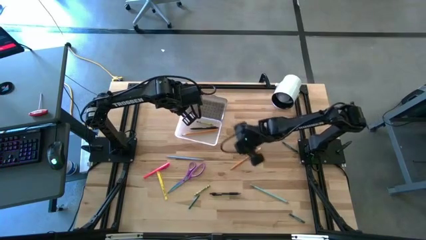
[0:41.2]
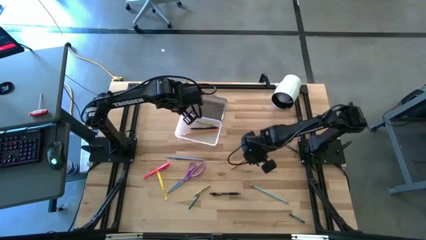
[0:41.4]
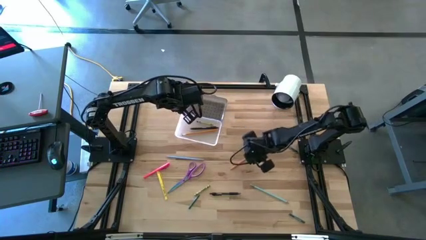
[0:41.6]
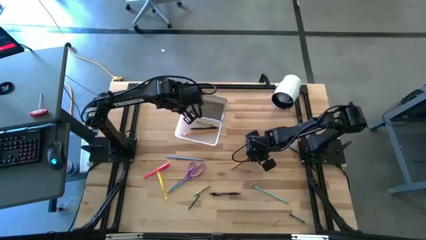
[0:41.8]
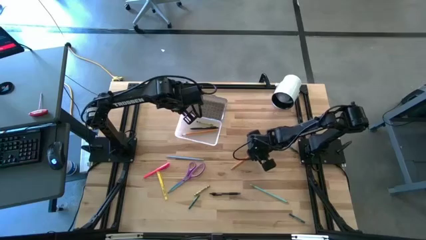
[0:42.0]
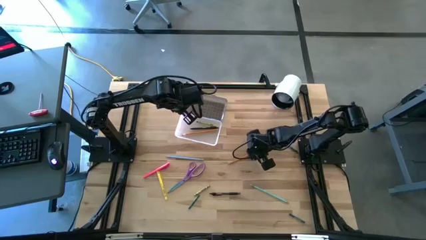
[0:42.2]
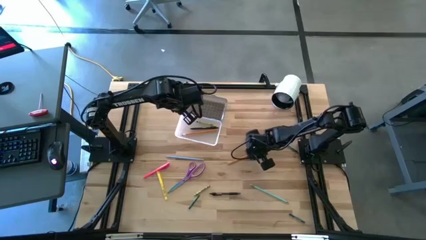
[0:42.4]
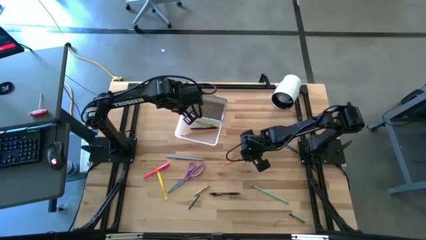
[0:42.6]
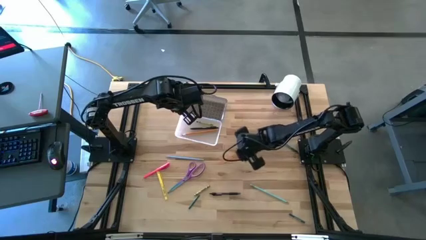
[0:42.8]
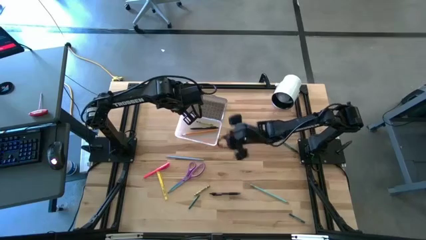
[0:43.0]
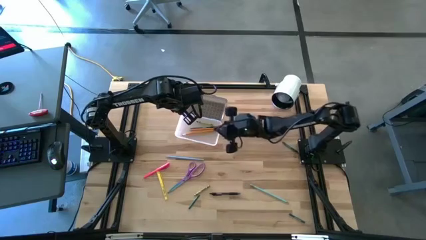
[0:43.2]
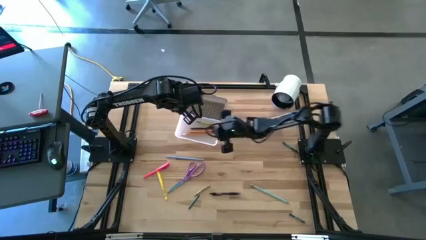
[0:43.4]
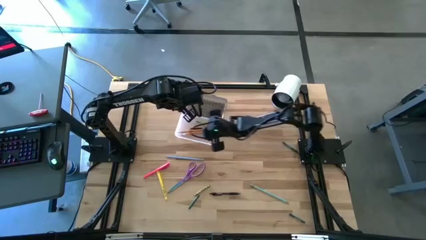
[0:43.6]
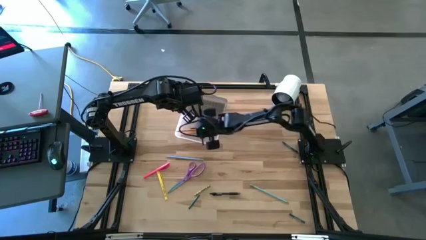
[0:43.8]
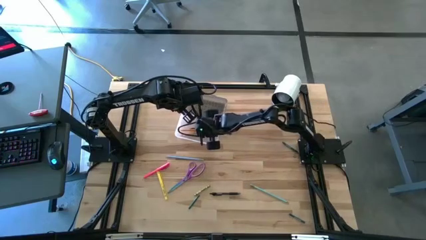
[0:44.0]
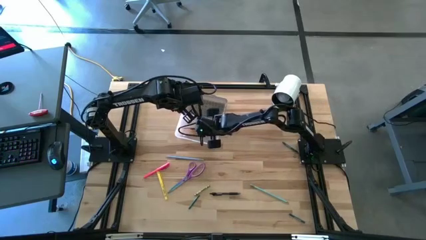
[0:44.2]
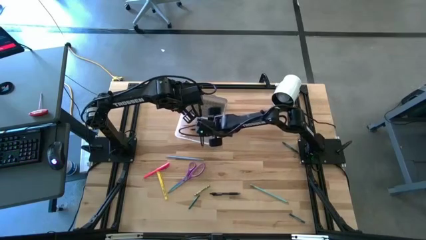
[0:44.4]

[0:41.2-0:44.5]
Task: Pick & place school supplies into a supply box
Put the orange pencil into the black supply box

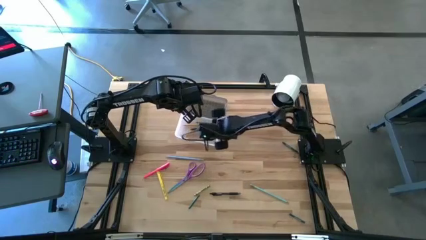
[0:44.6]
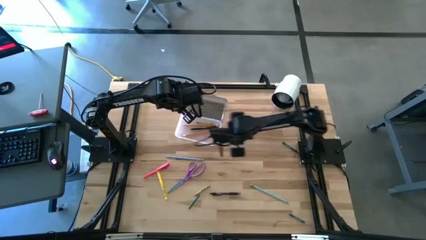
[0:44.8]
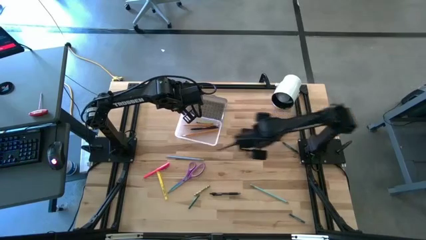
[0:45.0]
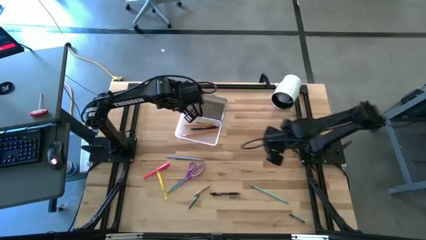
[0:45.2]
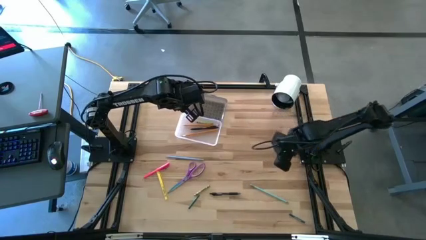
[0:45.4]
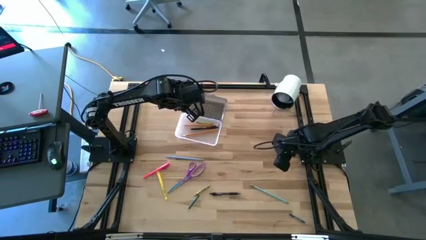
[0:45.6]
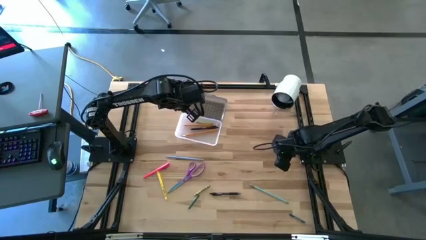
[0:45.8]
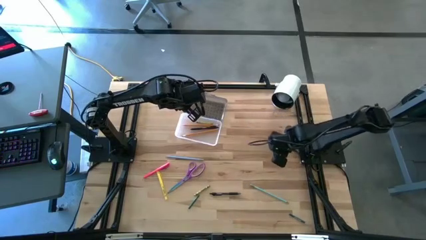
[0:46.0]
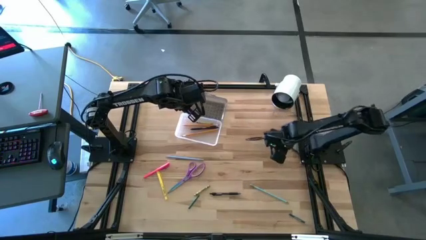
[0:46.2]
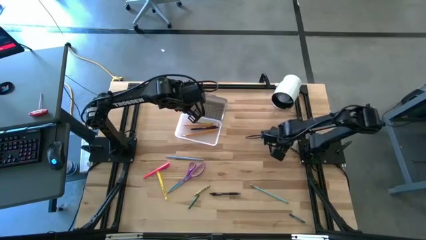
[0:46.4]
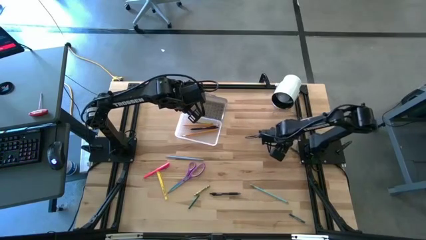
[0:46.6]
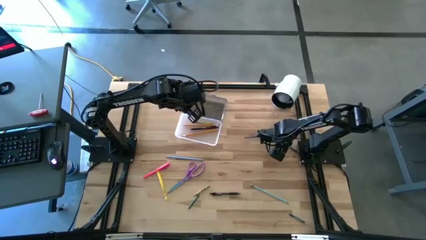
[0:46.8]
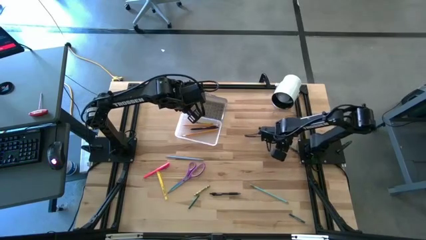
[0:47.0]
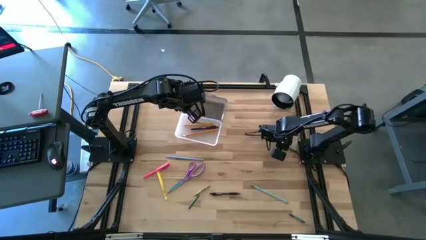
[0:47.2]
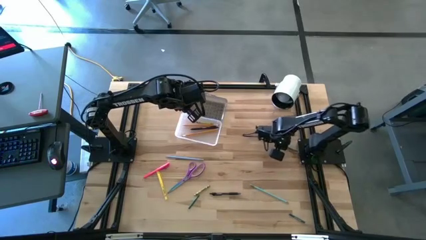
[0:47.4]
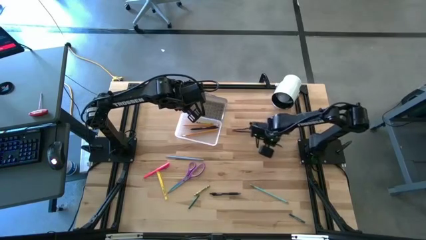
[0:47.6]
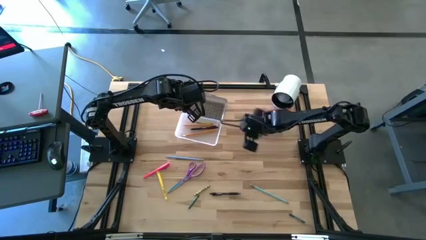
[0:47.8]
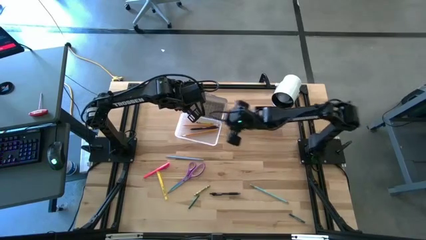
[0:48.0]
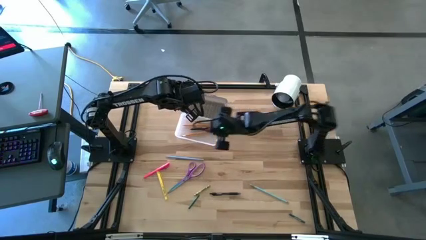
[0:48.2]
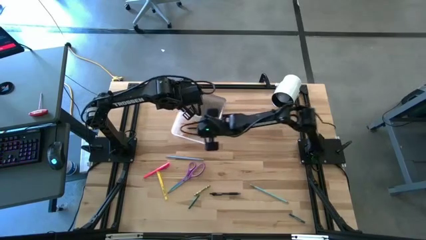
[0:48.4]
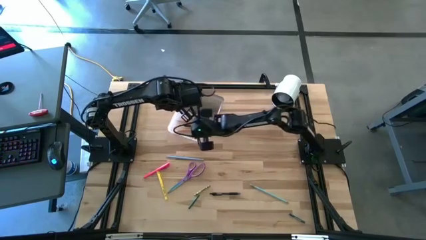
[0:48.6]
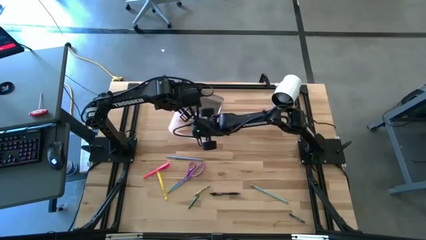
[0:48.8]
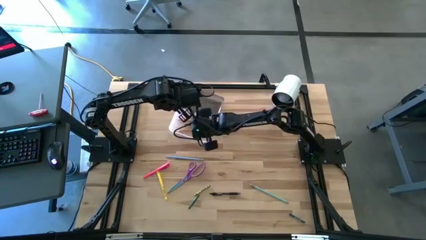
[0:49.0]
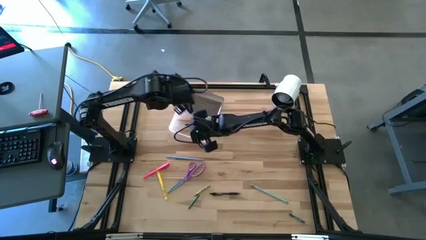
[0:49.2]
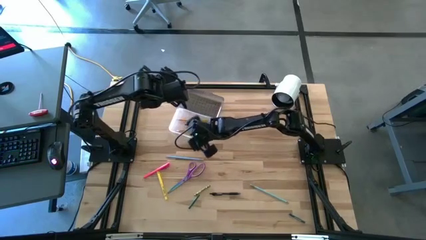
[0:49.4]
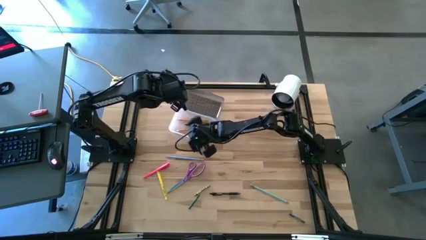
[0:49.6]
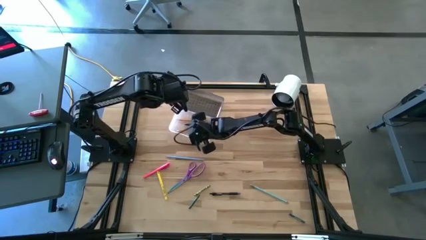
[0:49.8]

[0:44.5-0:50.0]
Put the green crayon into the black supply box

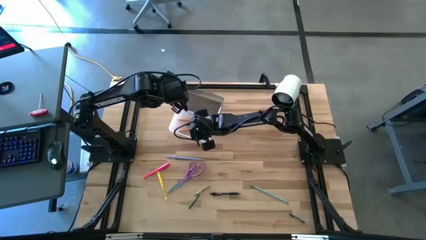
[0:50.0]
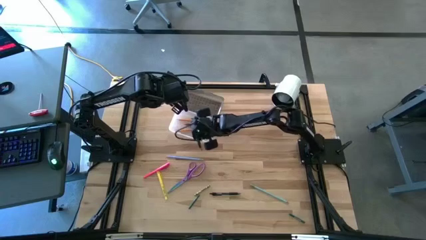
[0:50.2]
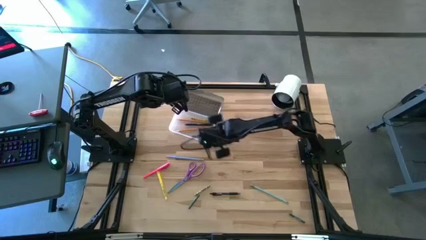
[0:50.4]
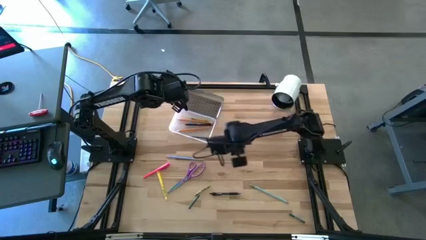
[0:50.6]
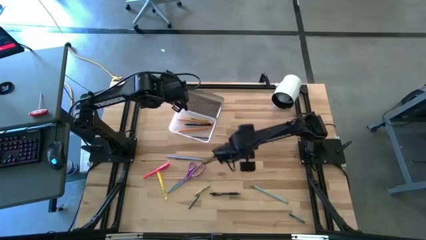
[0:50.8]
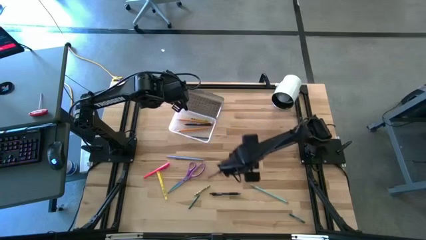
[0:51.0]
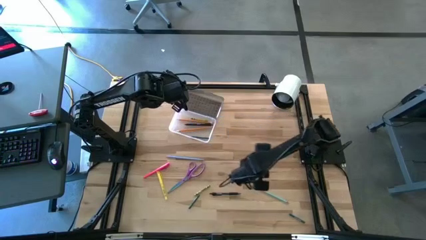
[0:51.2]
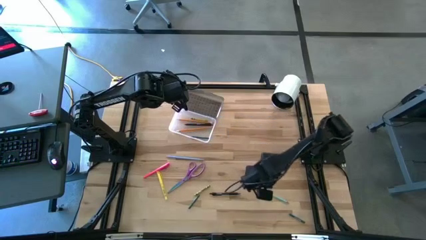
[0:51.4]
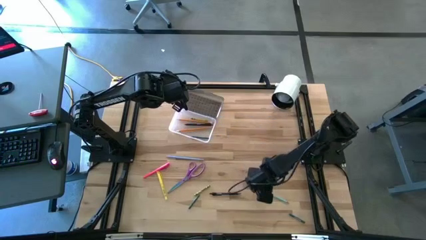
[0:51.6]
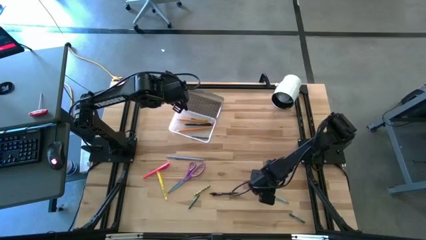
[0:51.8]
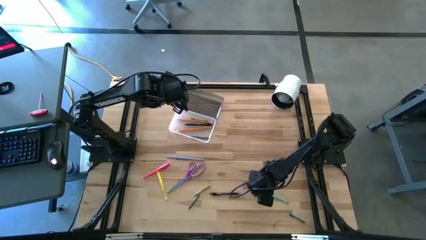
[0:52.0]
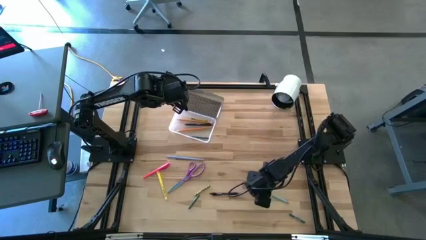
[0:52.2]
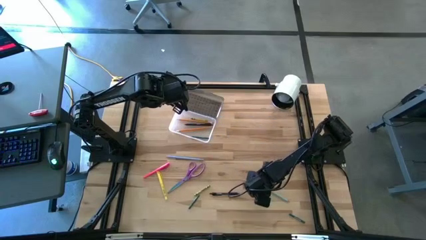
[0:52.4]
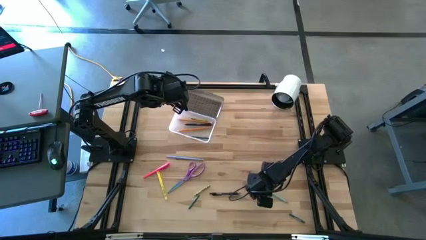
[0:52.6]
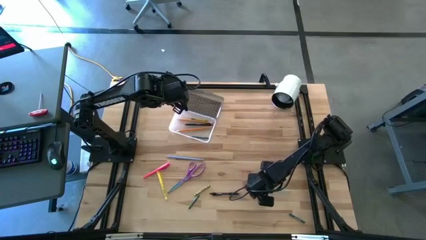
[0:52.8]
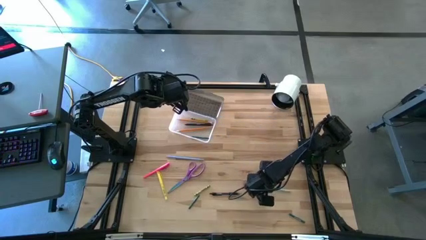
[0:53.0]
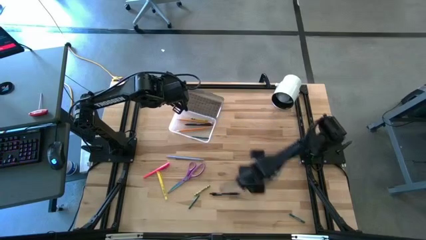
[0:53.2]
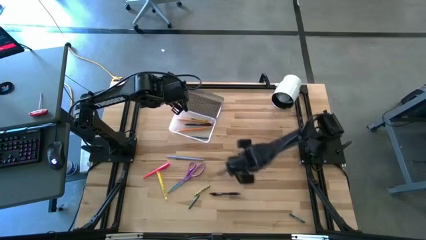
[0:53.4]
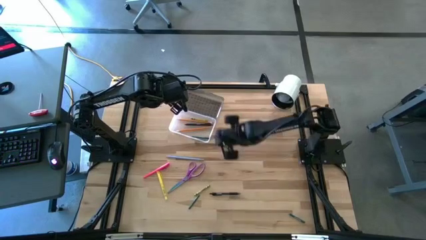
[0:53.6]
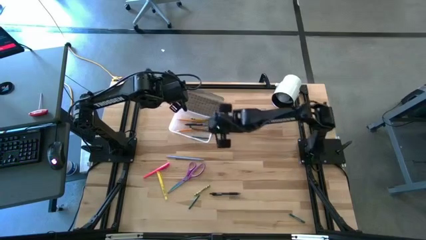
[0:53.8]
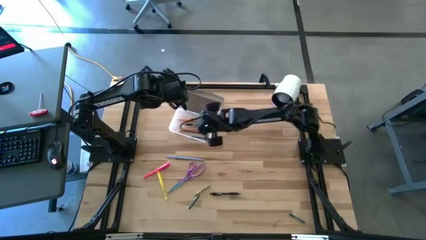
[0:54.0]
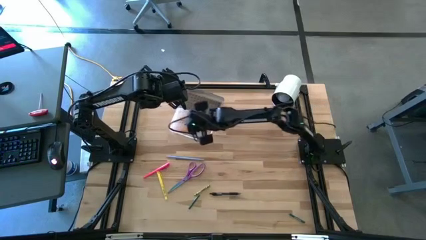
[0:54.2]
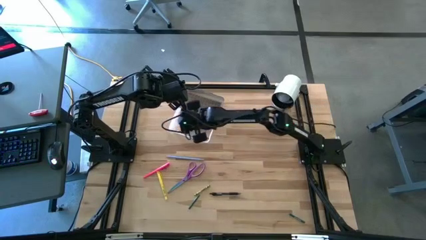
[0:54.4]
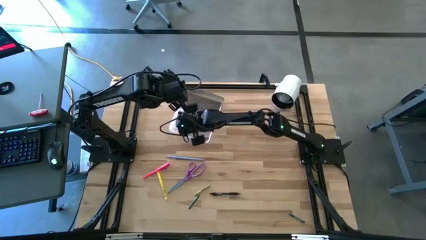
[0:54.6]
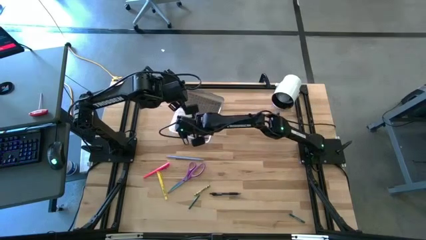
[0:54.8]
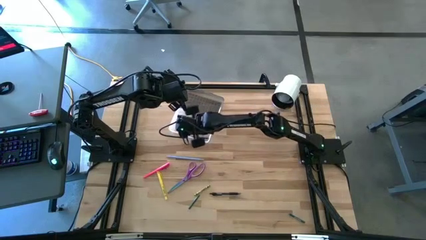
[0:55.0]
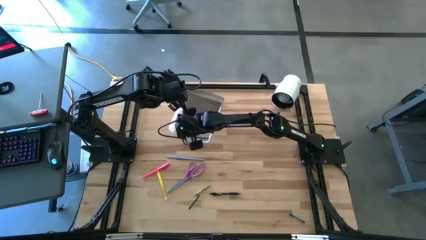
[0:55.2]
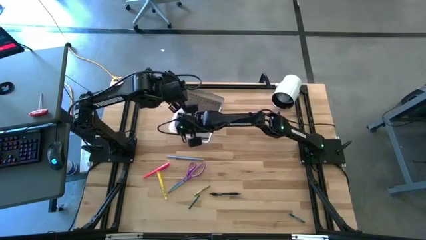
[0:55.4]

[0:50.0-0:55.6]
Put the blue pencil into the black supply box

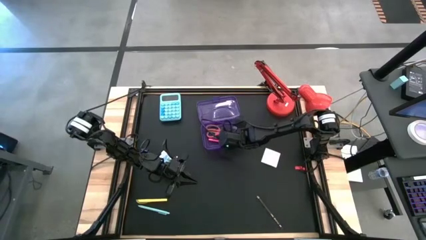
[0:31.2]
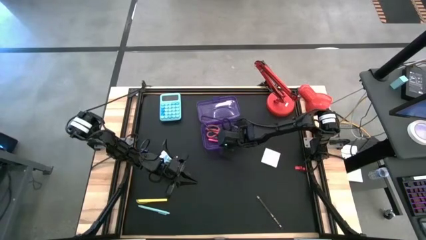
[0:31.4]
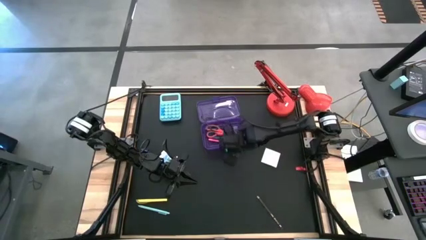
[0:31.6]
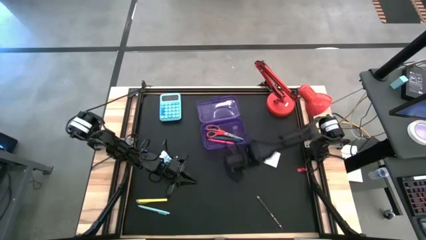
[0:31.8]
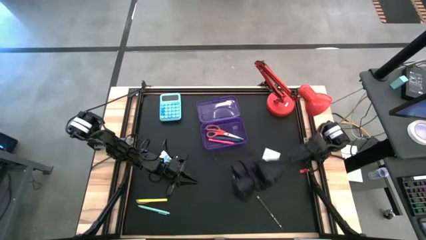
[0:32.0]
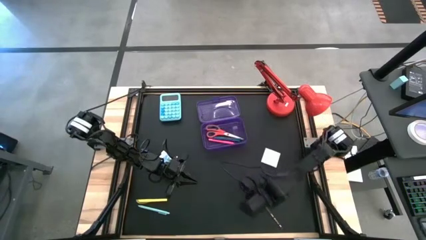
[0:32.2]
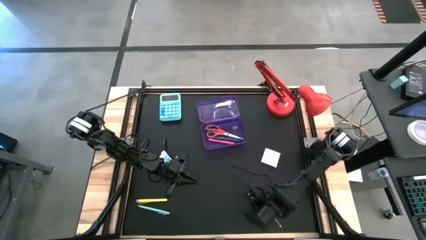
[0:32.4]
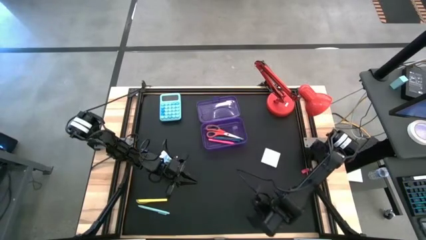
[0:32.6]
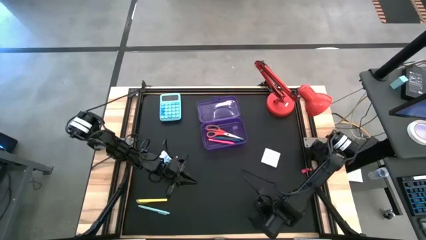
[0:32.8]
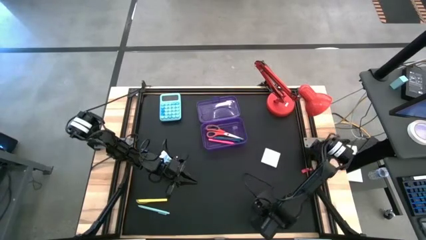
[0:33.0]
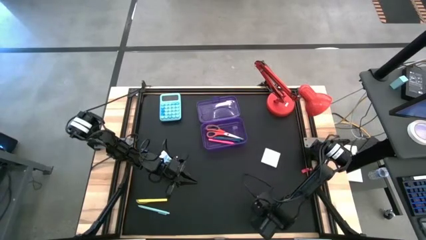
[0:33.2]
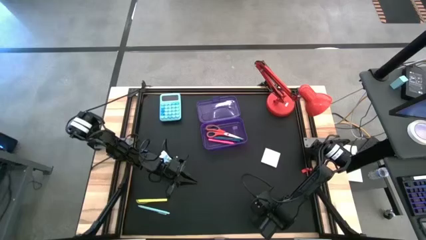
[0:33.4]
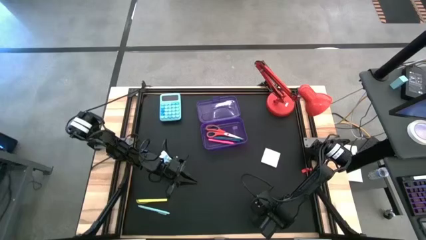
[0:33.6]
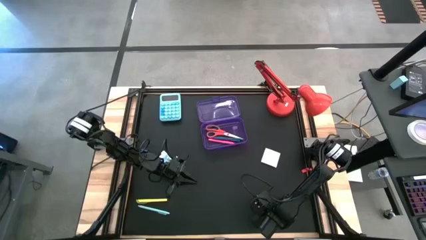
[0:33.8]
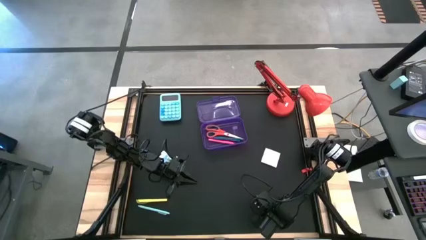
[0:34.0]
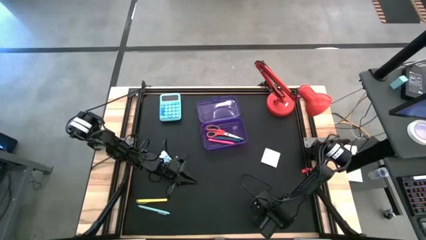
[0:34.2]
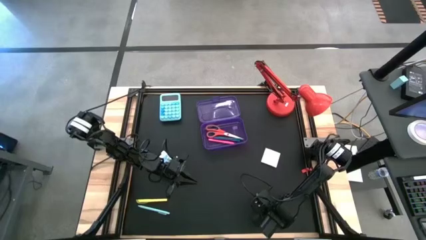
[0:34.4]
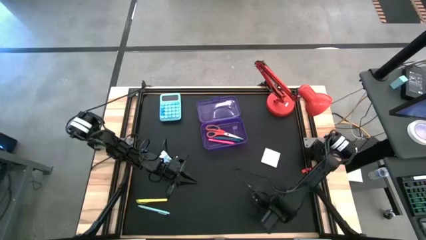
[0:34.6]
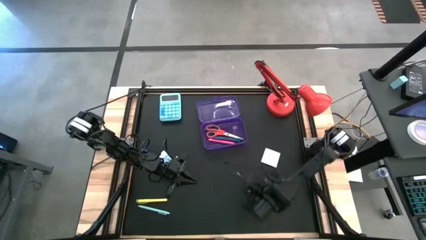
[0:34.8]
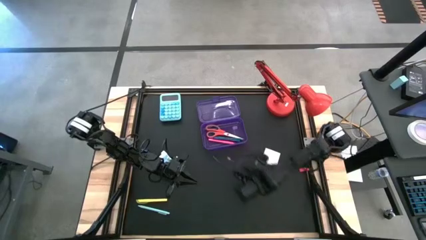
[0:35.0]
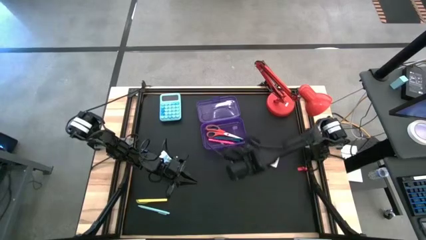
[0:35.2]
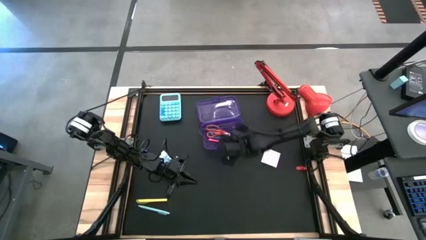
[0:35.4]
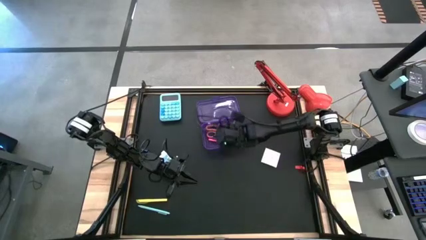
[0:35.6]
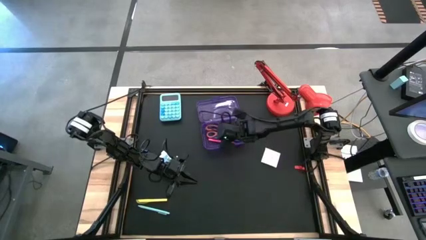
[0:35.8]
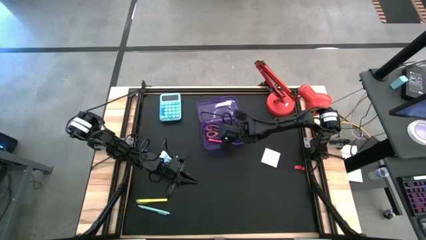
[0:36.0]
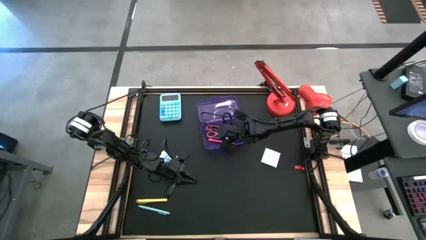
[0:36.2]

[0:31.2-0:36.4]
Task: Pack school essentials
Put the black and white pencil into the violet supply box
